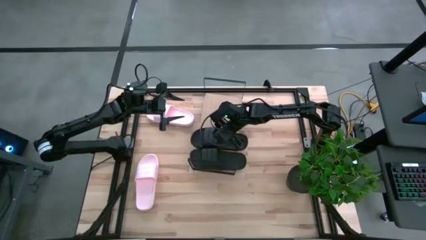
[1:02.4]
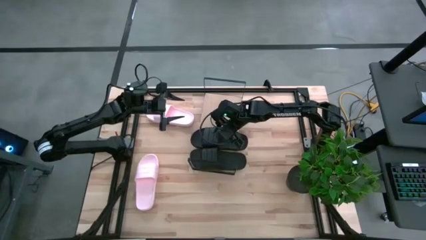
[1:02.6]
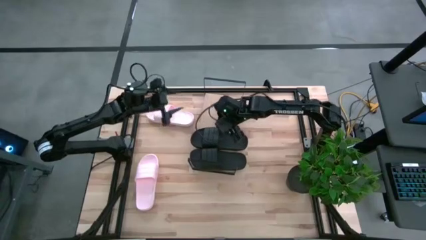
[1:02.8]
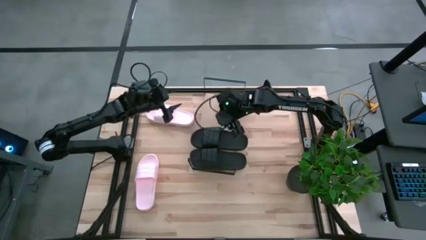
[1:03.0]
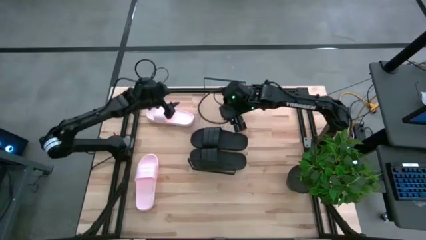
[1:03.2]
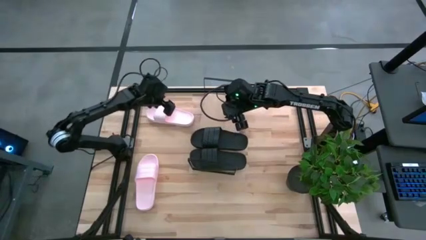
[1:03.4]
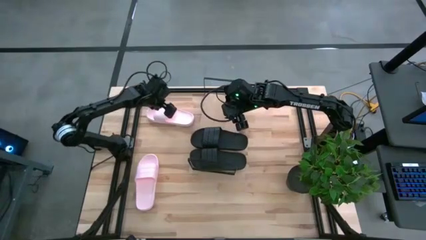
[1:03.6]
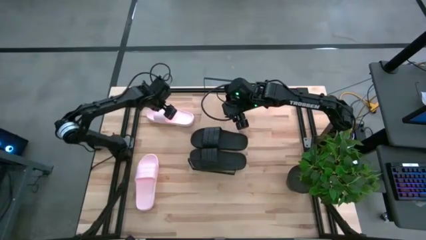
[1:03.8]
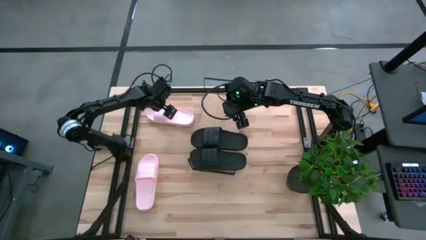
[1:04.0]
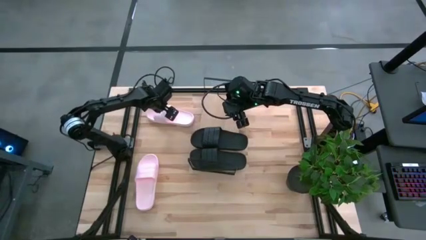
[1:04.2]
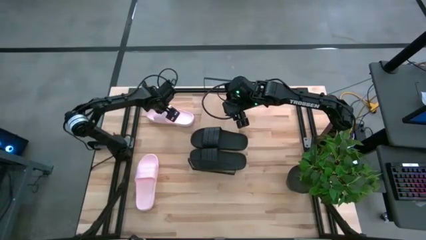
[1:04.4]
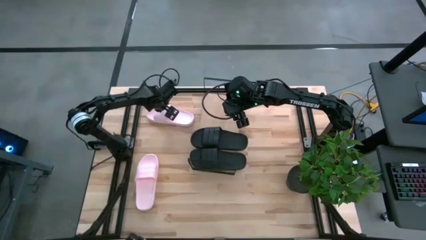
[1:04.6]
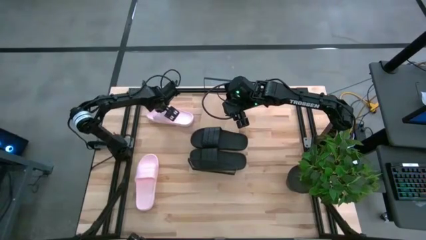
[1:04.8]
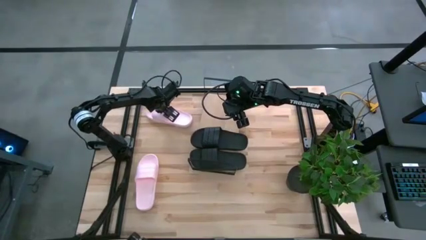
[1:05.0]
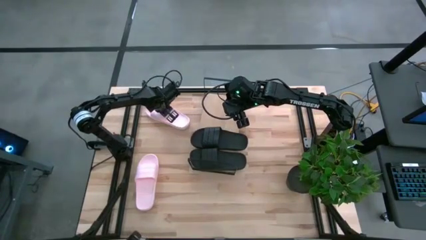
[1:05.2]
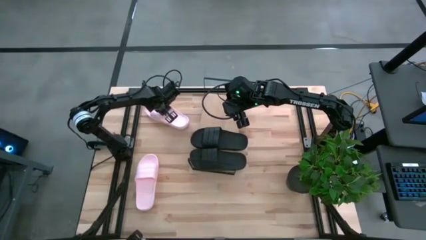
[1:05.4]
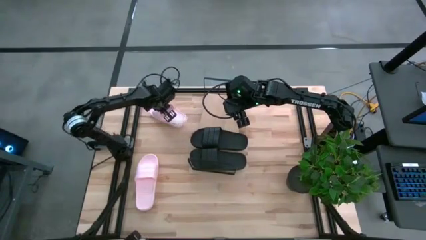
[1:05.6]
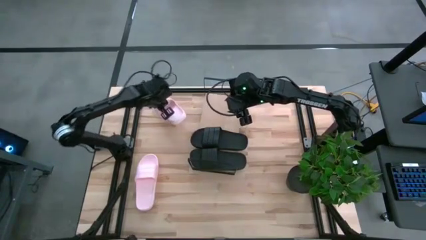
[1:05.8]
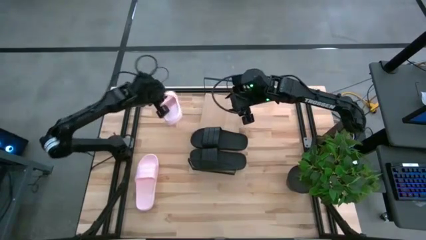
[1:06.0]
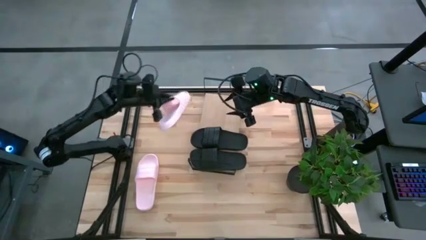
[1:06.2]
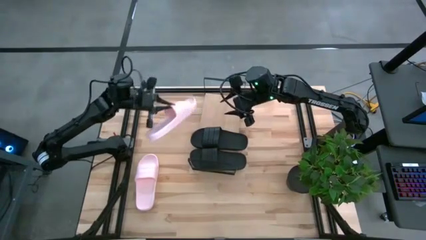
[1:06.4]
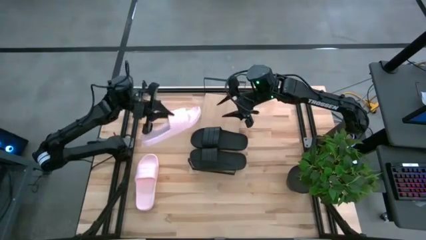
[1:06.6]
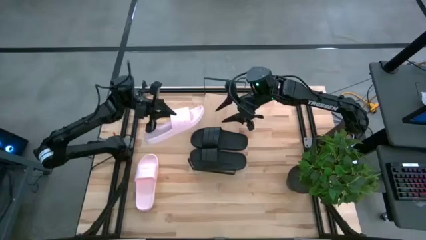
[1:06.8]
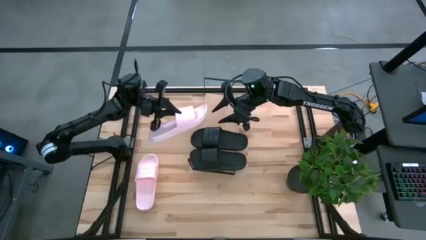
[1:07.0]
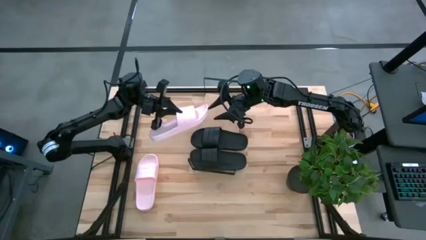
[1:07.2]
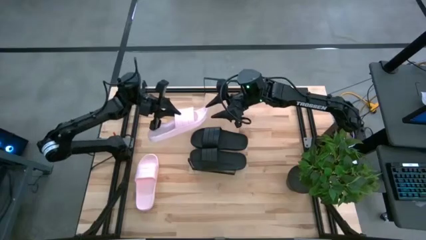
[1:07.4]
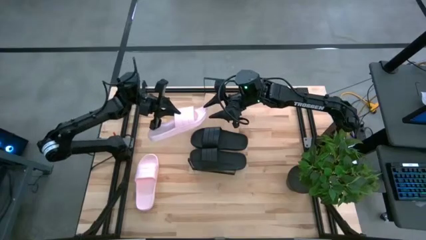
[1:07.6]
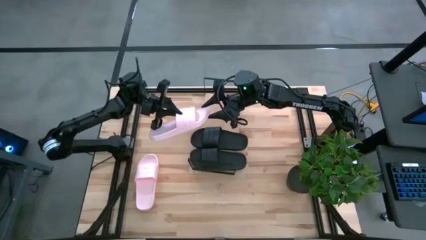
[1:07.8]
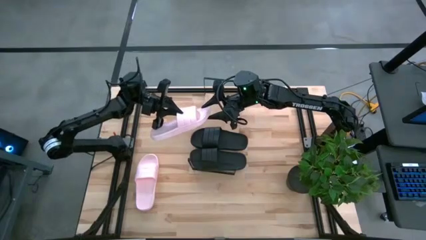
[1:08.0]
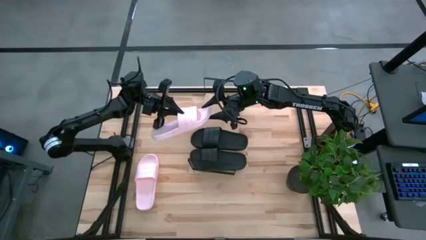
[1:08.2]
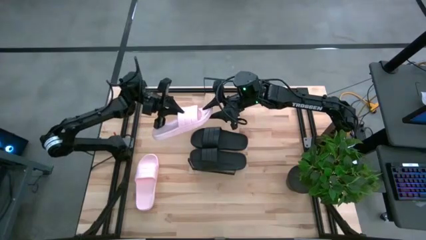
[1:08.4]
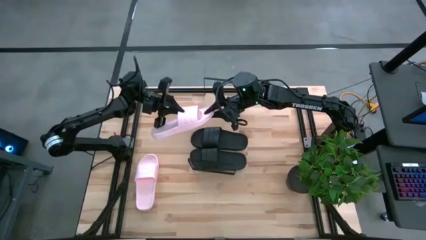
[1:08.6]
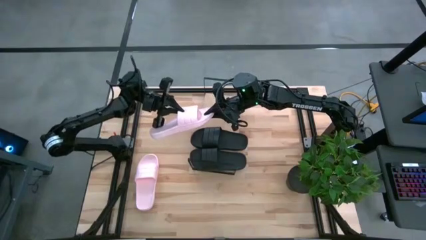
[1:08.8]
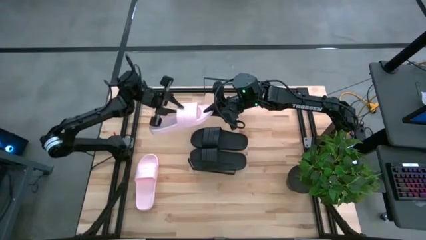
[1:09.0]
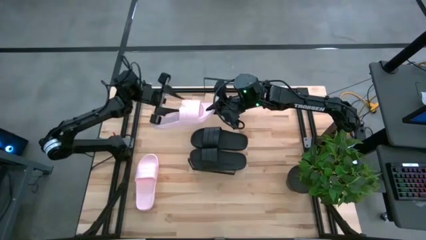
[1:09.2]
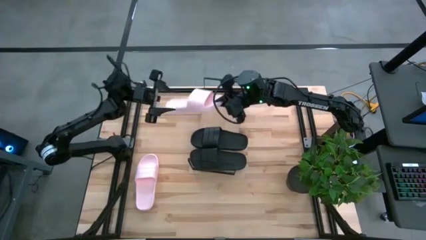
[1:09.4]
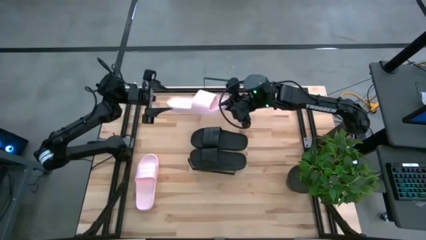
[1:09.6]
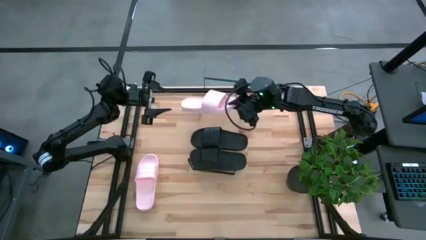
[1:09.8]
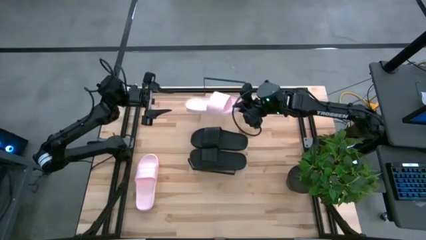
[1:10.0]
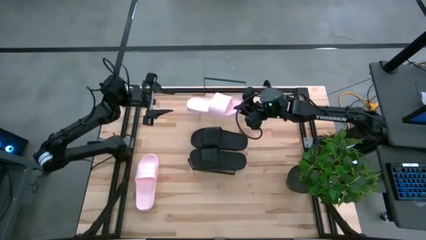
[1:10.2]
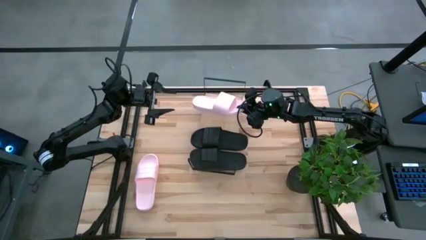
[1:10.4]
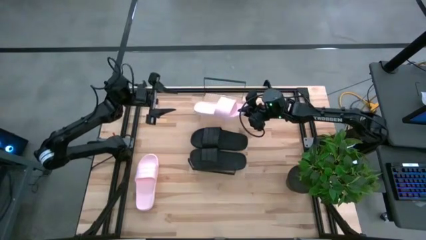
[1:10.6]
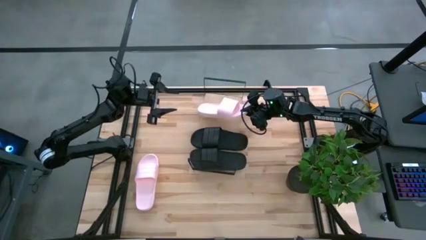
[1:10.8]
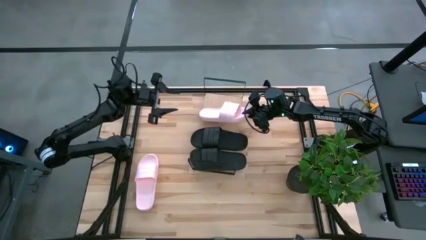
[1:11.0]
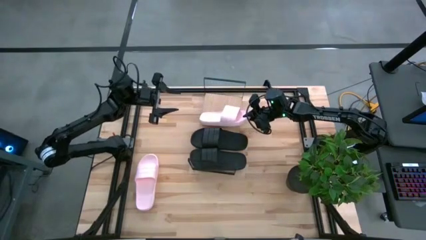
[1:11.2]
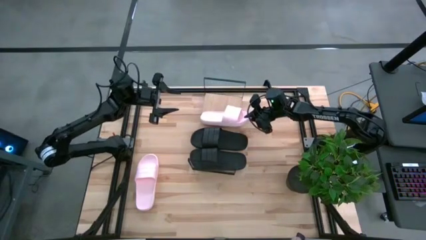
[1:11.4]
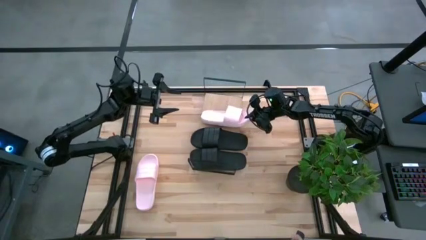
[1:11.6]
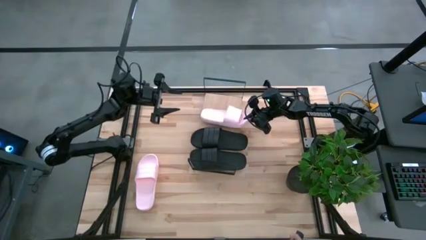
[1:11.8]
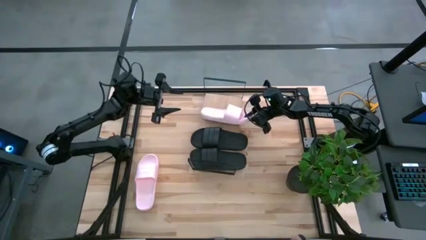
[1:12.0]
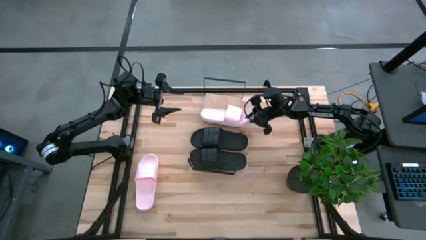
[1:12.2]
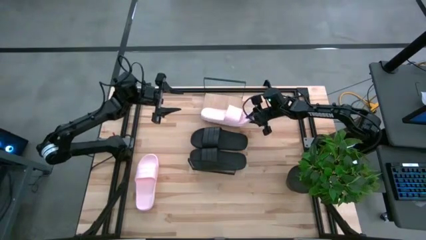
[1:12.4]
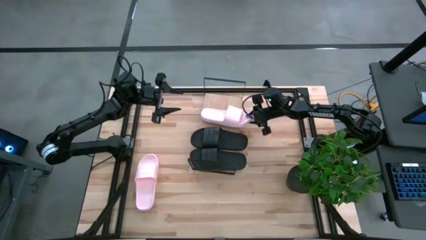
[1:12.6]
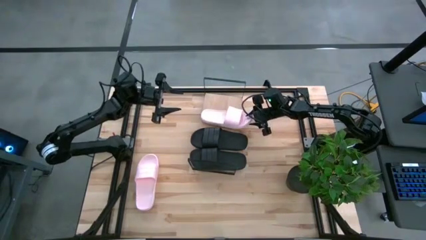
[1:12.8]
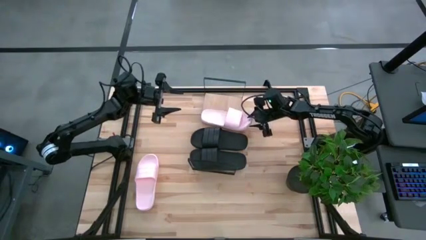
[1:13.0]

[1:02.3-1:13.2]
Task: Pick and place slides into the shelf
Put the top pink slides on the shelf
